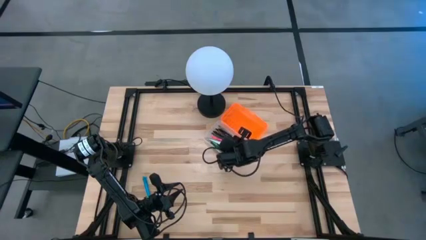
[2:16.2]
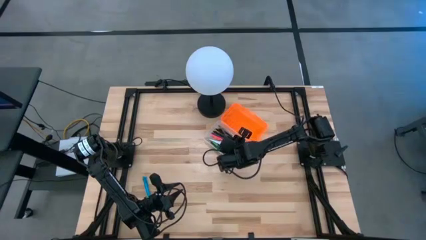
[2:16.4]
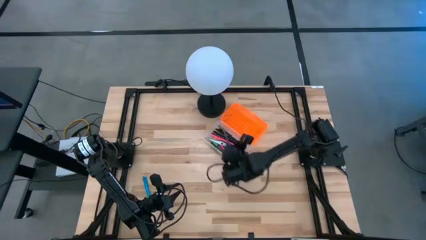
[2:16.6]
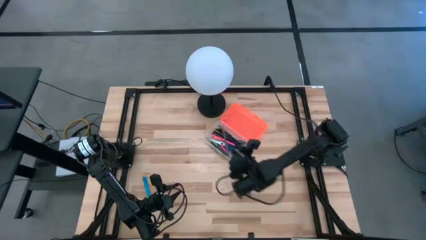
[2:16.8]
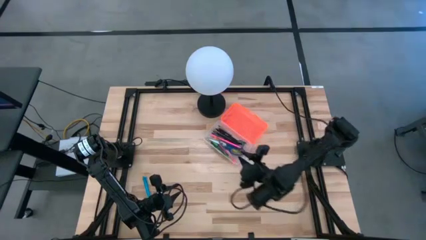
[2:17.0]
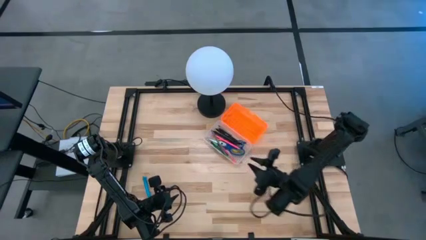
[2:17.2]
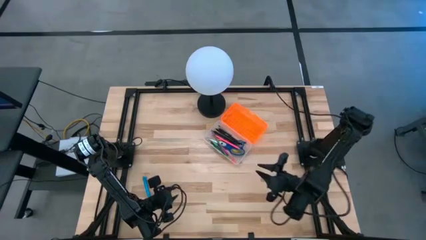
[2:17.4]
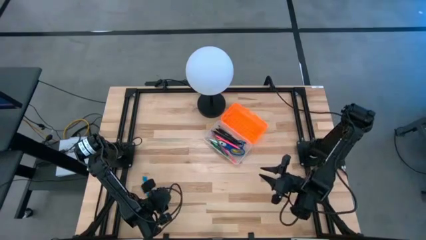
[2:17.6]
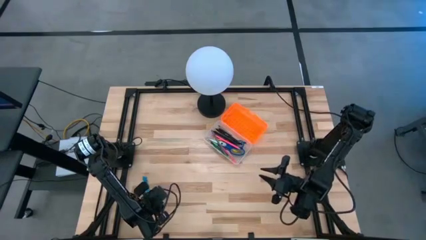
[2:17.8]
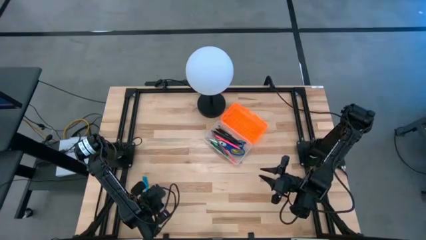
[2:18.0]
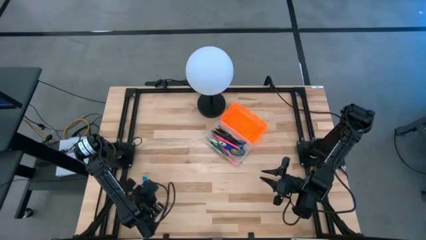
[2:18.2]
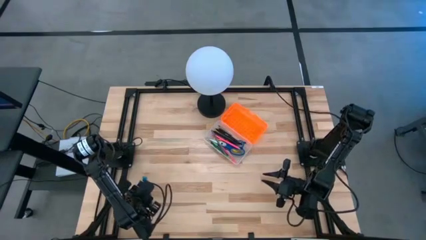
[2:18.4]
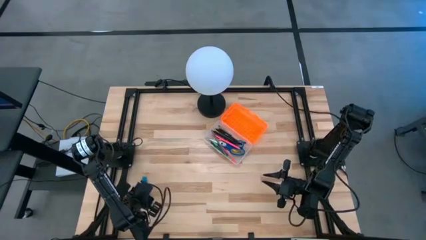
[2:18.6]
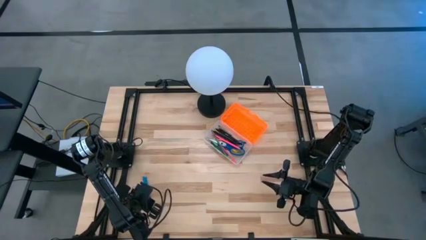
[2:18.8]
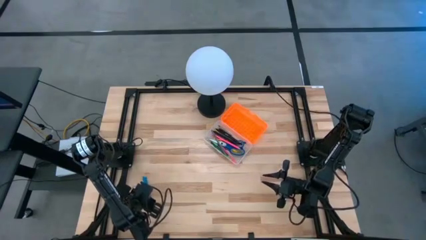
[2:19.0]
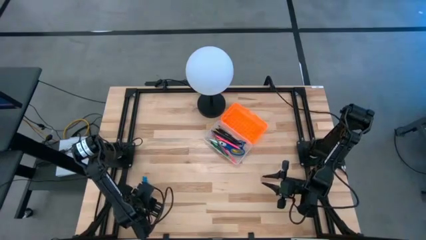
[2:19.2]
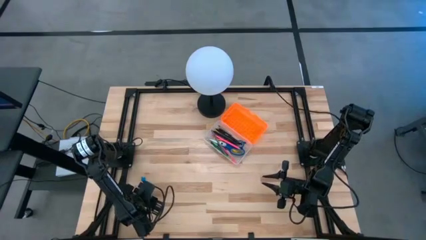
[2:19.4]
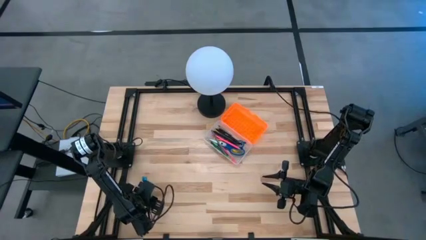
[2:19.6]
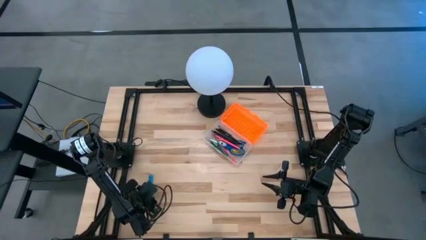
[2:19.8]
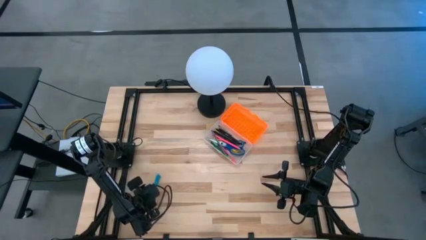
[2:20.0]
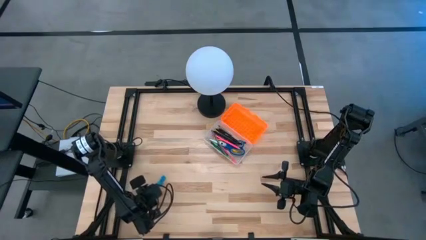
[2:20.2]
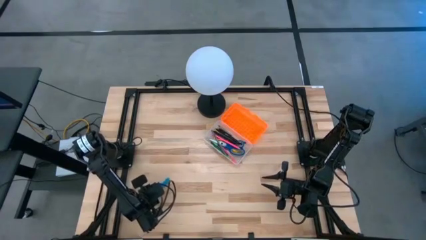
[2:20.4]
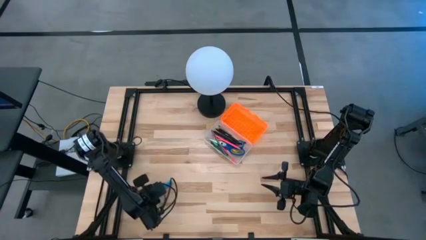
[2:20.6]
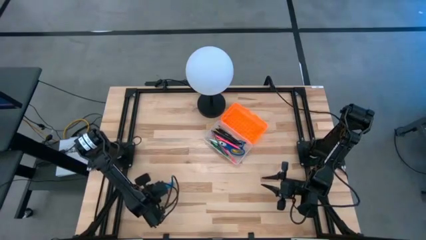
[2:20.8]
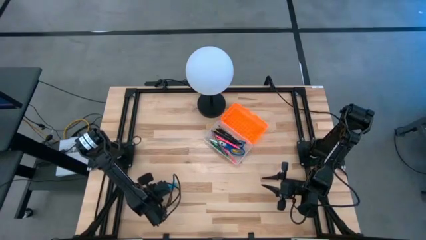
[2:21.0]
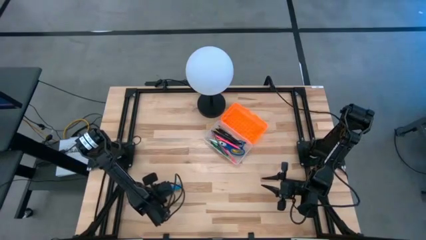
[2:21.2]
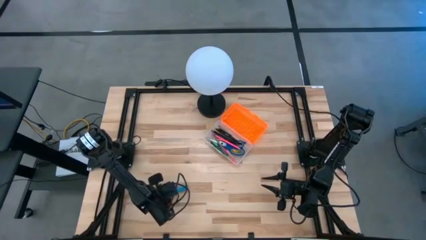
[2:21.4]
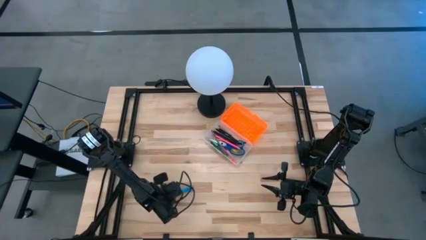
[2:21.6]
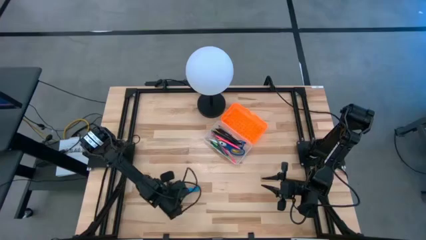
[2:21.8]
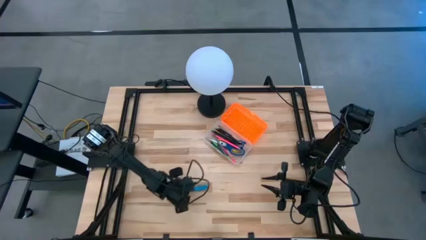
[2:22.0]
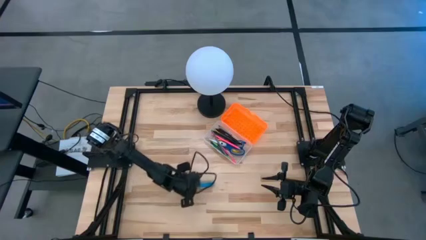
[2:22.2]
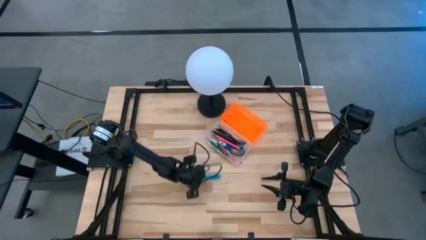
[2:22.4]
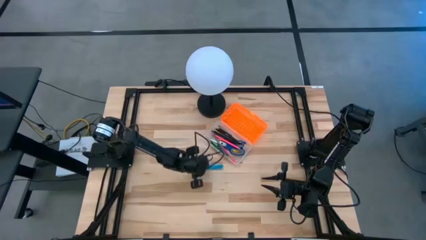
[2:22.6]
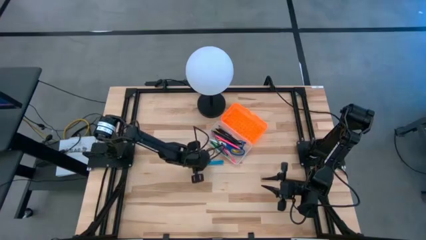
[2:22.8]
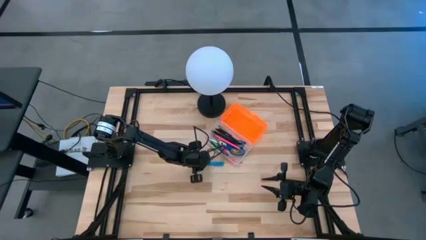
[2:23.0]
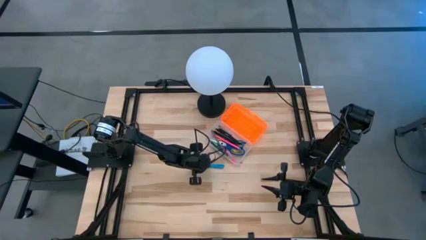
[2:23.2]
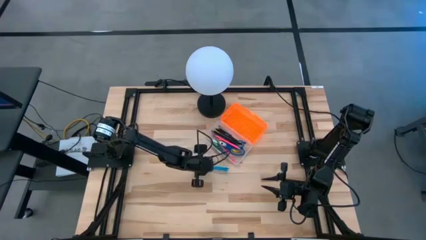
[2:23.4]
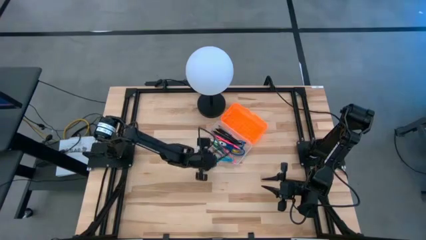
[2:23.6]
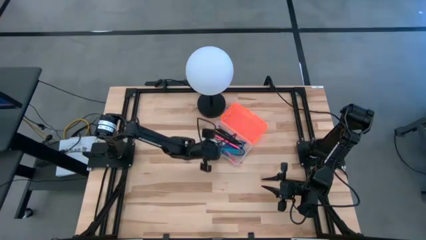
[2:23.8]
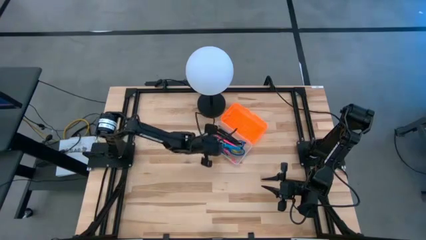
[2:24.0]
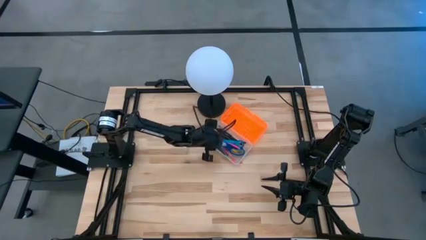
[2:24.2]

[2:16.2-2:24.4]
Task: Pick & place school supplies into a supply box
Put the blue pen into the orange supply box

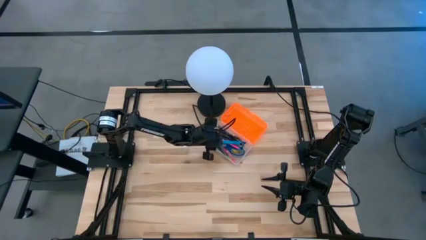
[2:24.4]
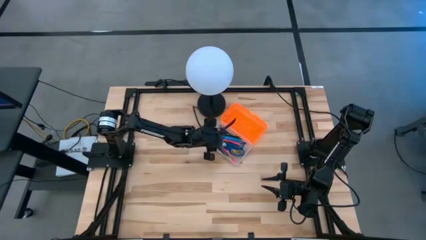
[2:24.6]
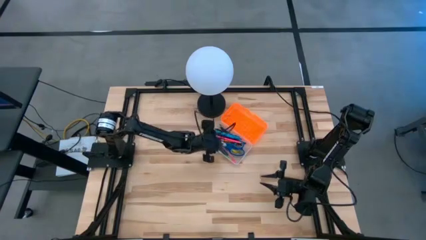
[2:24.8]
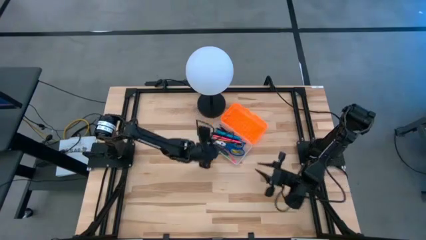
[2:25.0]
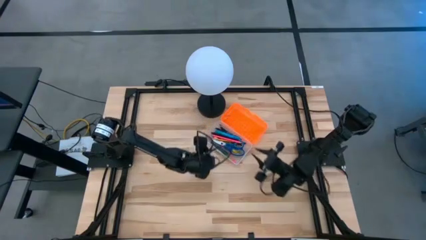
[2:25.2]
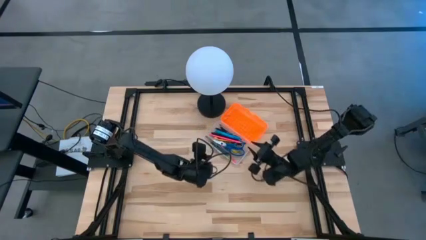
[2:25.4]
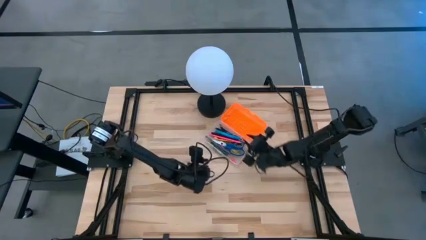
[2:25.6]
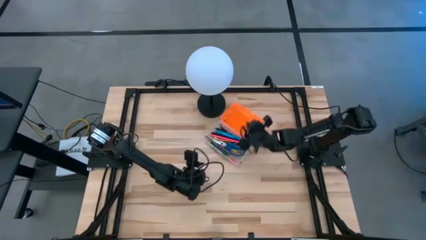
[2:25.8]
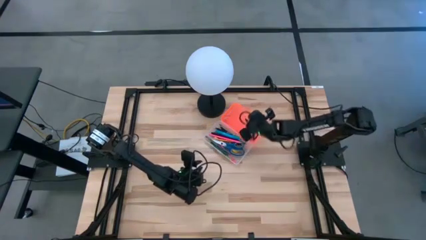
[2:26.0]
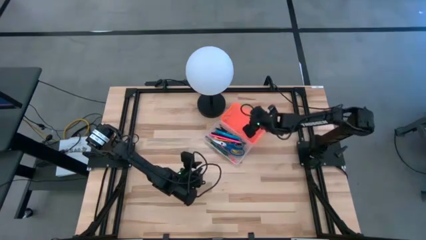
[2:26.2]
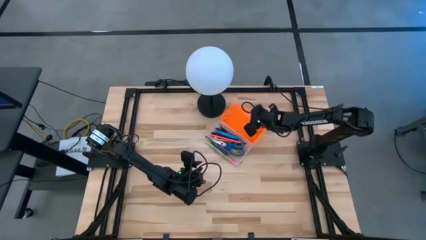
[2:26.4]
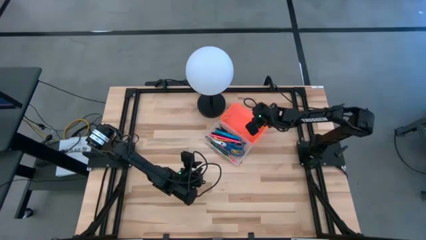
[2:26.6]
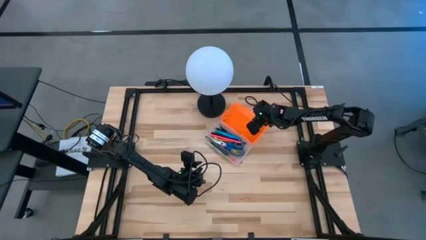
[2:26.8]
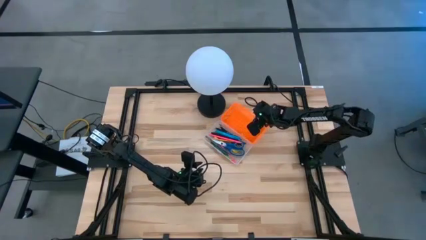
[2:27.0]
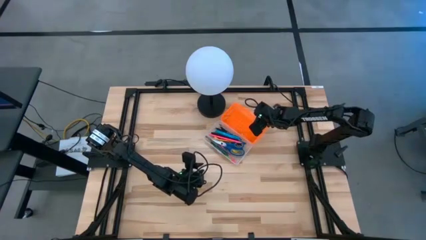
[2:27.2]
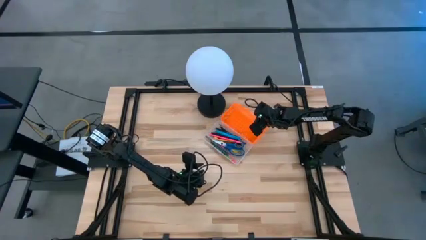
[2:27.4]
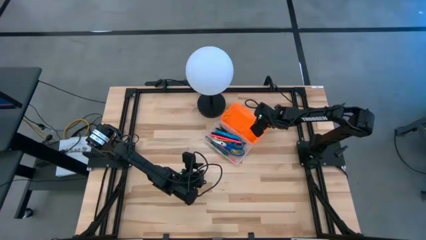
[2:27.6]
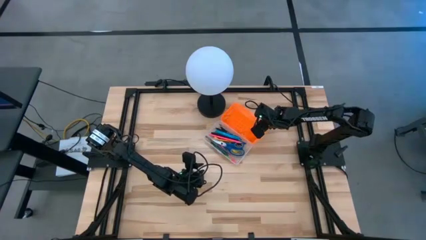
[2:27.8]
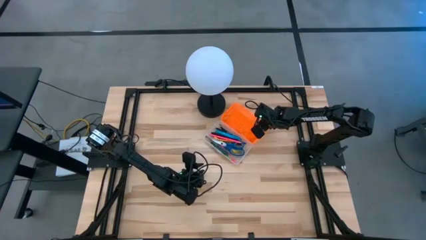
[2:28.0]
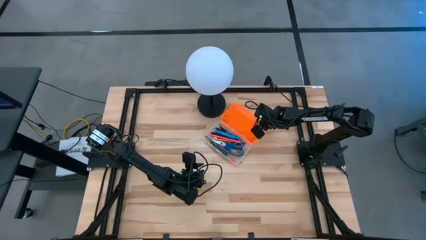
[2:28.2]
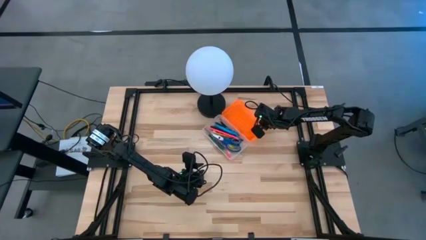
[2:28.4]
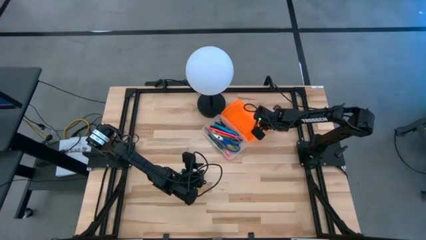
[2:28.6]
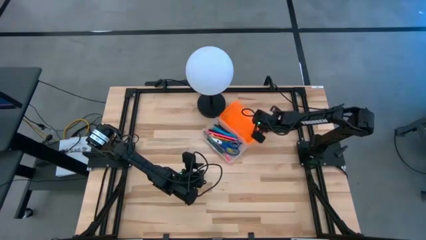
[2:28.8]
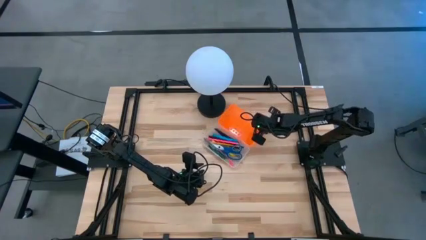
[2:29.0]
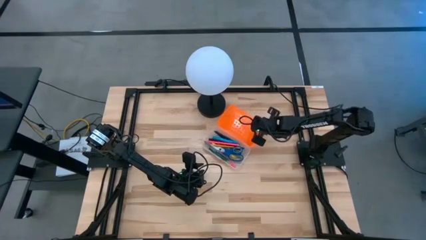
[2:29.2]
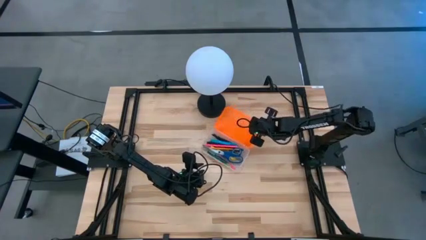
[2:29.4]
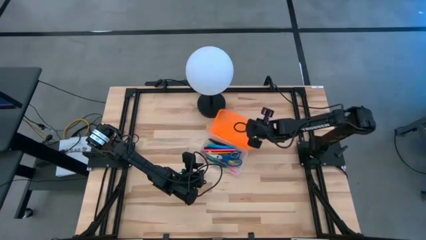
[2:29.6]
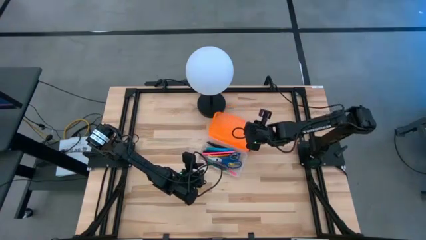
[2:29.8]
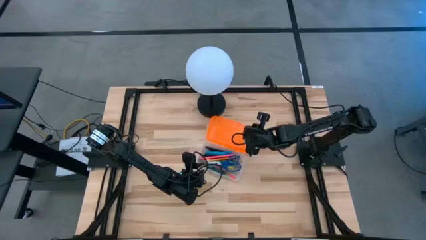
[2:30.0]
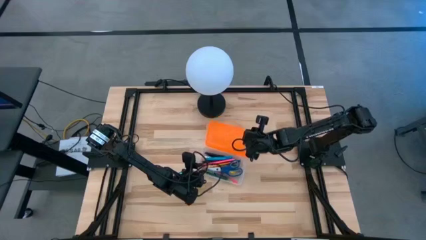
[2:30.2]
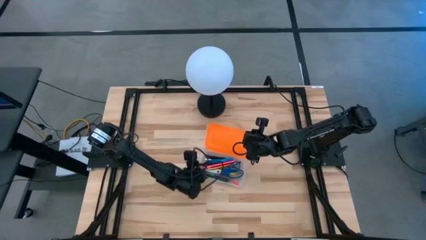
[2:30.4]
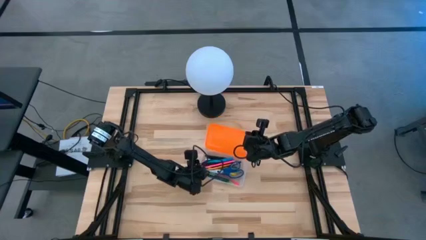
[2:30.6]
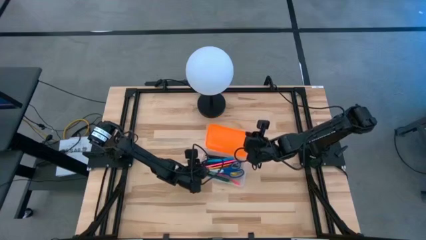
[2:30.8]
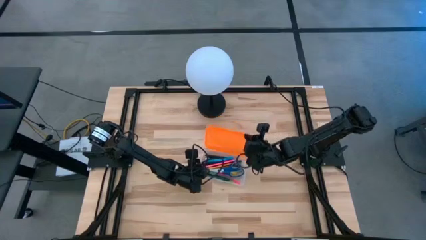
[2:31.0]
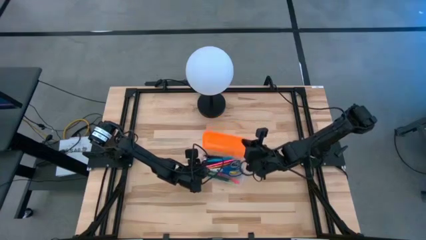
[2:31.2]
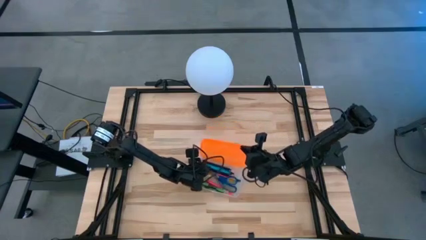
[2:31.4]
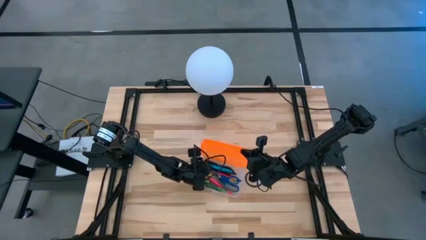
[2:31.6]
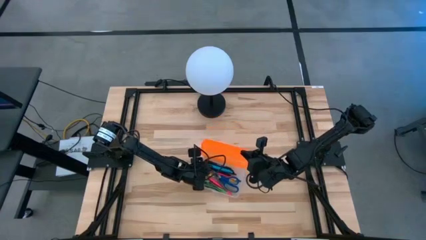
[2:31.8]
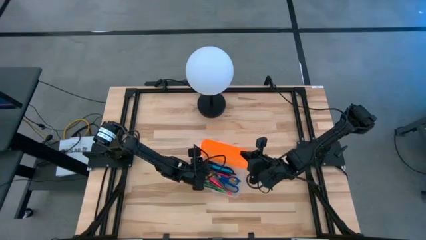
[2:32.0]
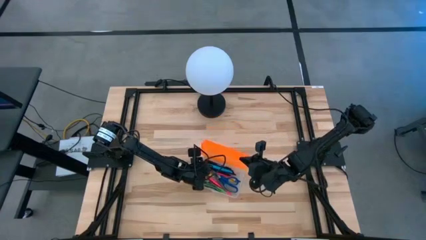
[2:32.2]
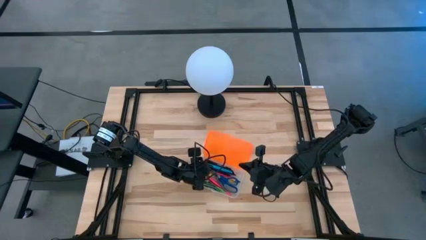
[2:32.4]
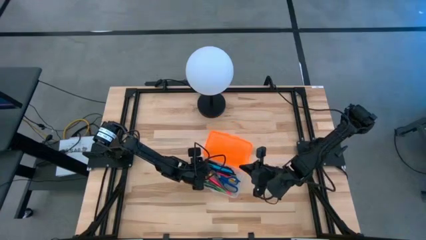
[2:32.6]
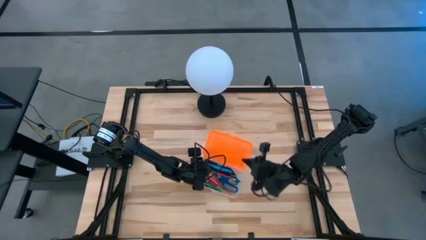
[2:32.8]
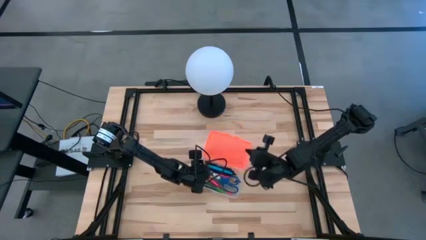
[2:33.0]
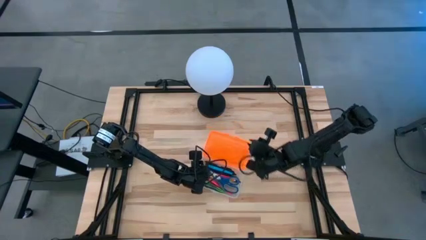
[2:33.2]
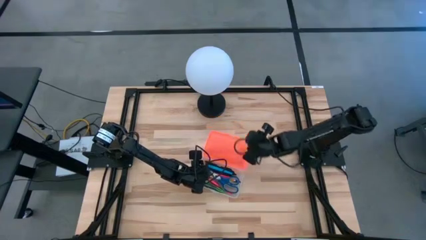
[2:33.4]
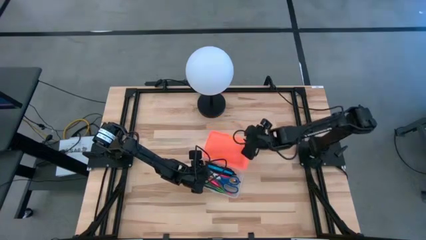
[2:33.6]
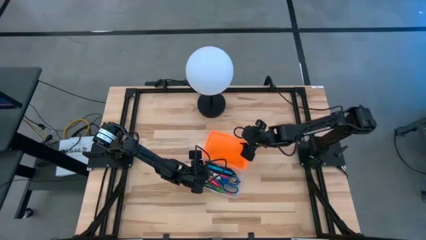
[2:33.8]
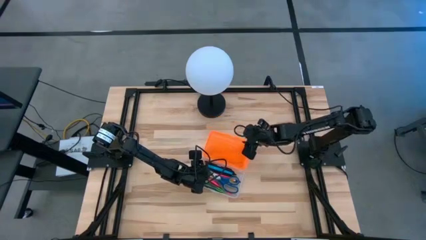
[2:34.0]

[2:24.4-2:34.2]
Close the orange supply box
